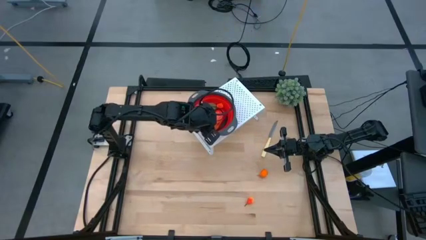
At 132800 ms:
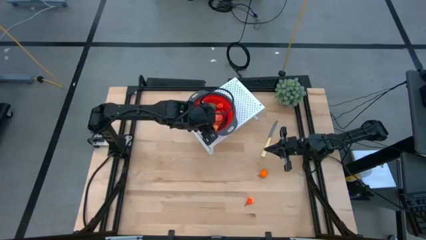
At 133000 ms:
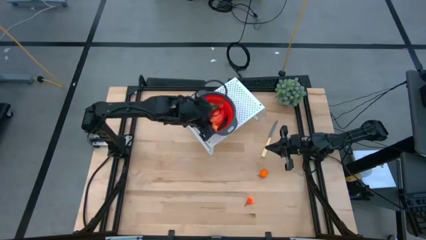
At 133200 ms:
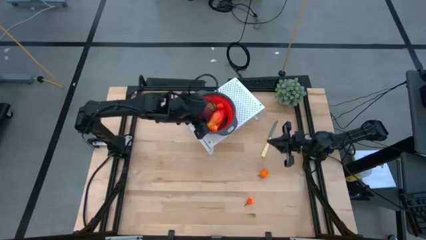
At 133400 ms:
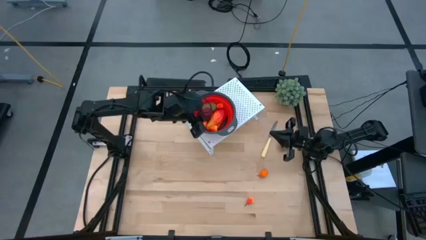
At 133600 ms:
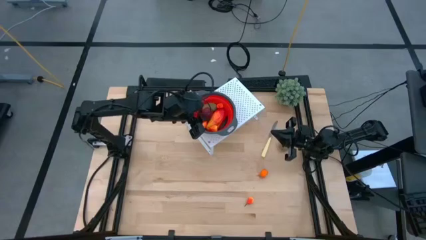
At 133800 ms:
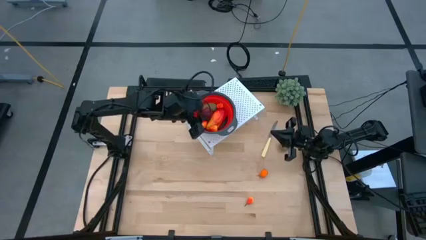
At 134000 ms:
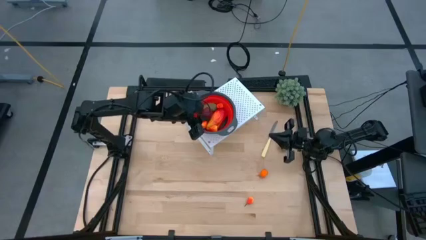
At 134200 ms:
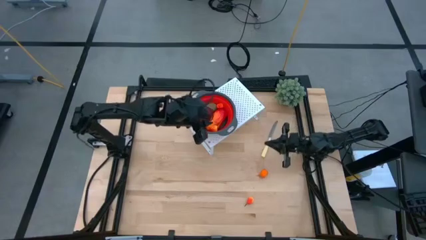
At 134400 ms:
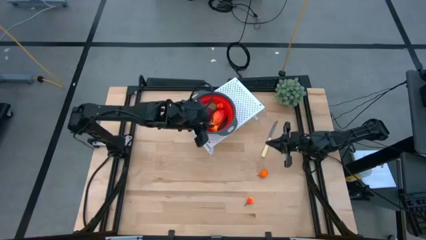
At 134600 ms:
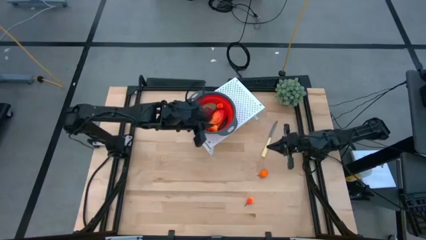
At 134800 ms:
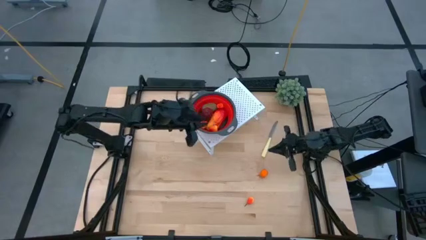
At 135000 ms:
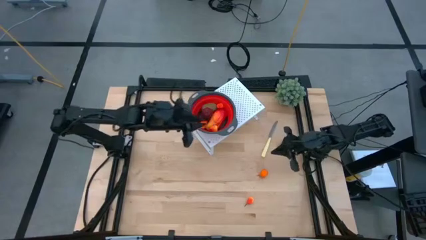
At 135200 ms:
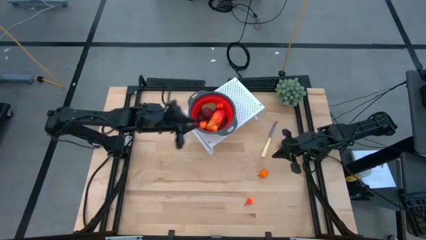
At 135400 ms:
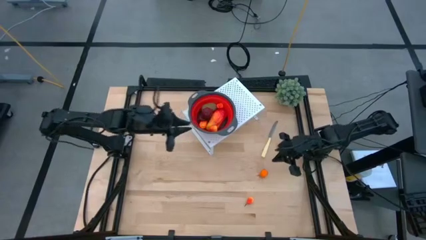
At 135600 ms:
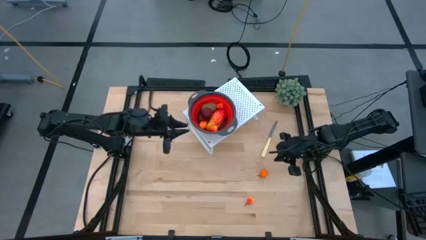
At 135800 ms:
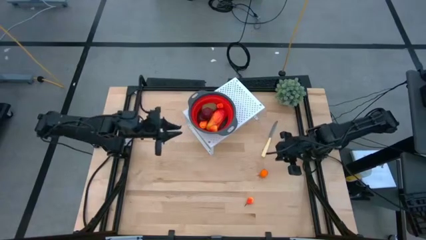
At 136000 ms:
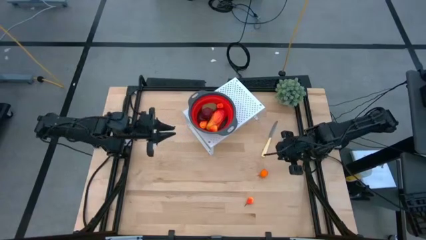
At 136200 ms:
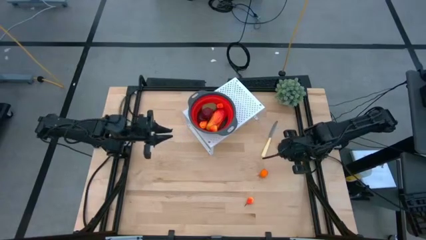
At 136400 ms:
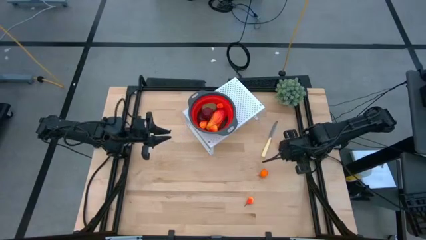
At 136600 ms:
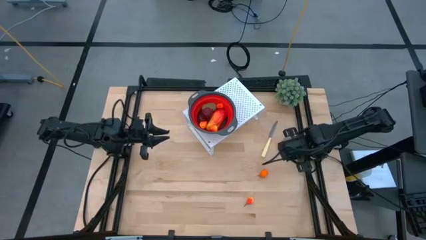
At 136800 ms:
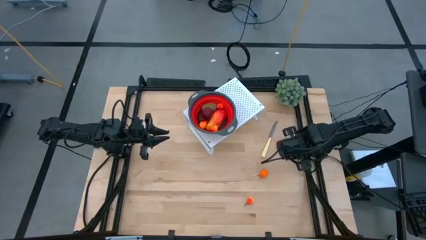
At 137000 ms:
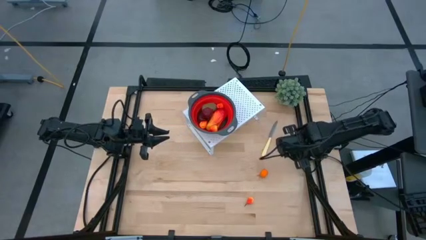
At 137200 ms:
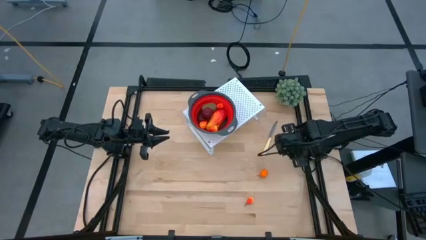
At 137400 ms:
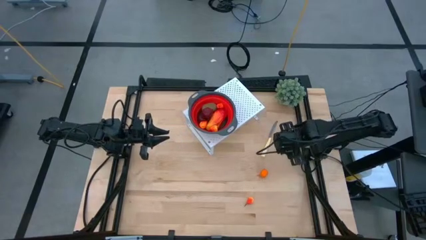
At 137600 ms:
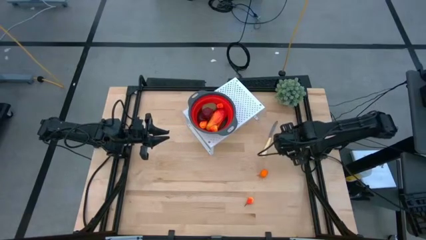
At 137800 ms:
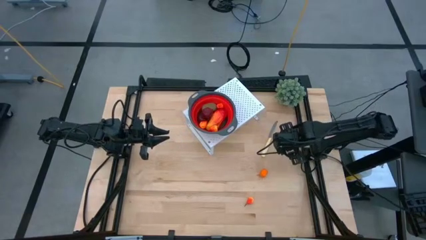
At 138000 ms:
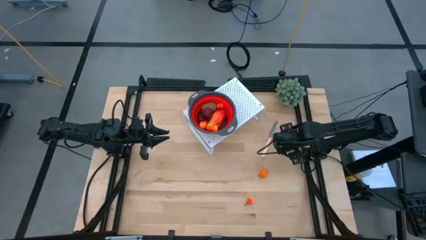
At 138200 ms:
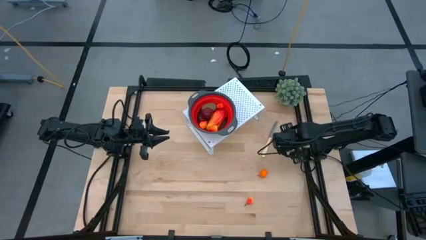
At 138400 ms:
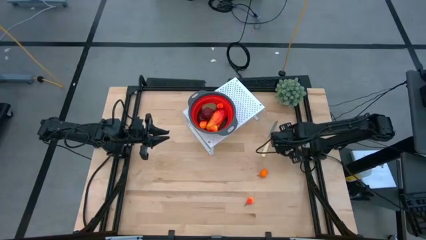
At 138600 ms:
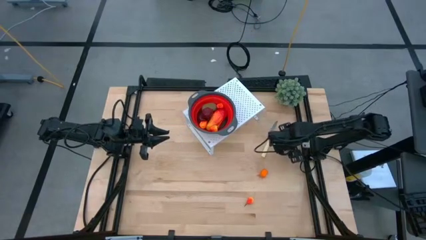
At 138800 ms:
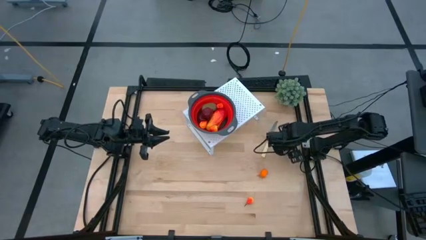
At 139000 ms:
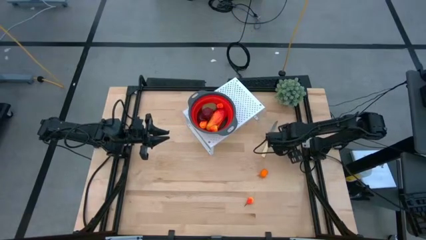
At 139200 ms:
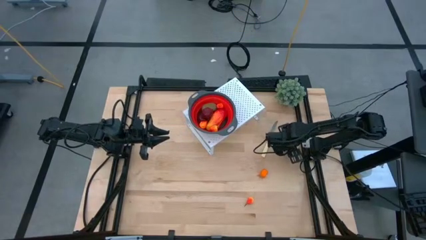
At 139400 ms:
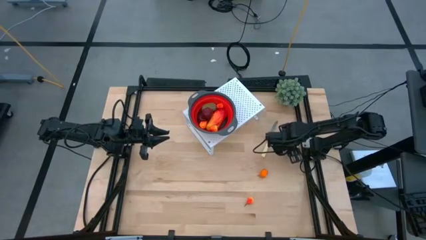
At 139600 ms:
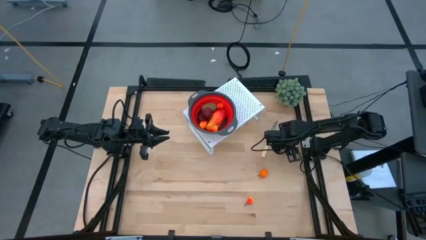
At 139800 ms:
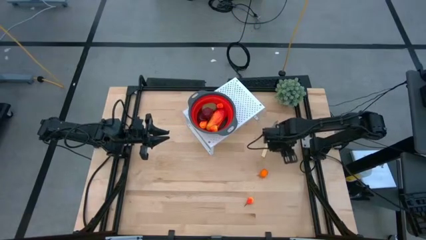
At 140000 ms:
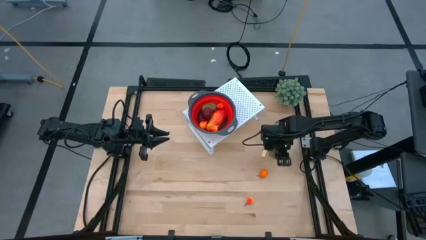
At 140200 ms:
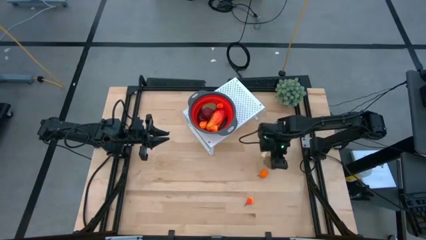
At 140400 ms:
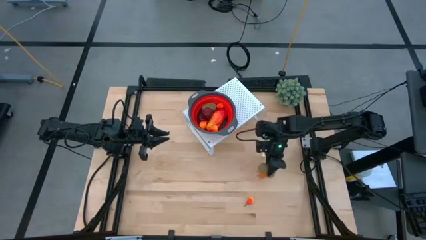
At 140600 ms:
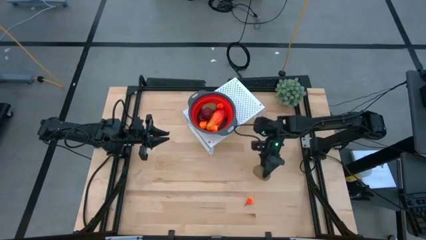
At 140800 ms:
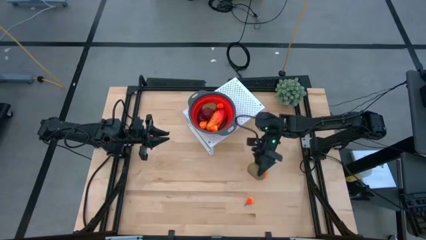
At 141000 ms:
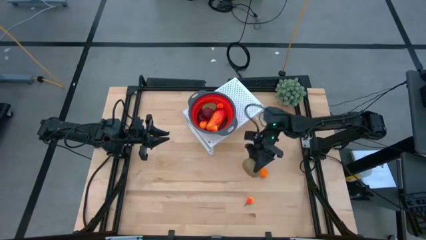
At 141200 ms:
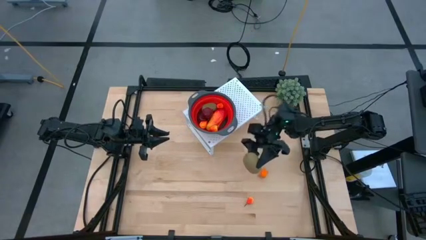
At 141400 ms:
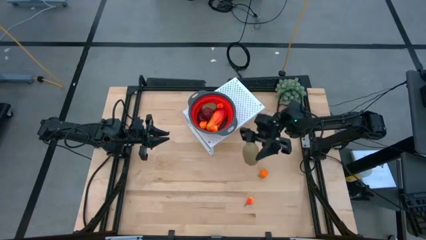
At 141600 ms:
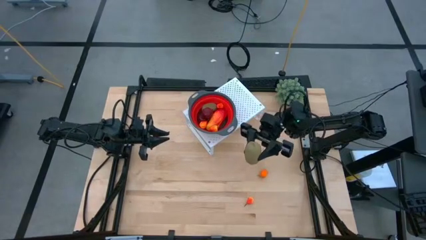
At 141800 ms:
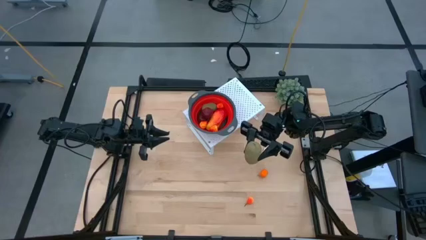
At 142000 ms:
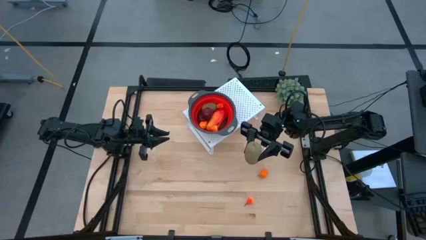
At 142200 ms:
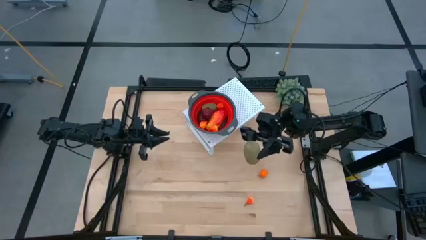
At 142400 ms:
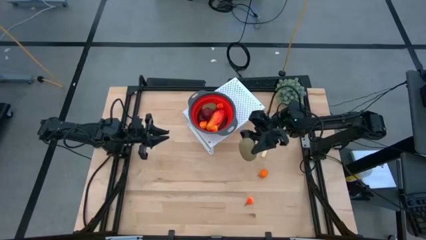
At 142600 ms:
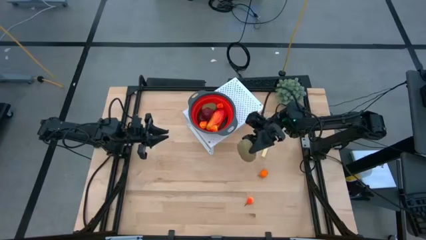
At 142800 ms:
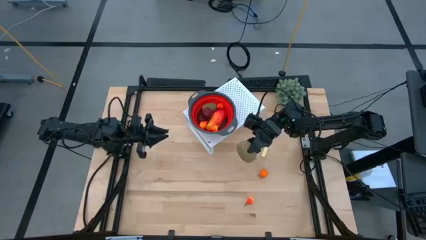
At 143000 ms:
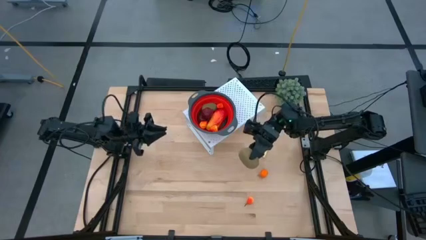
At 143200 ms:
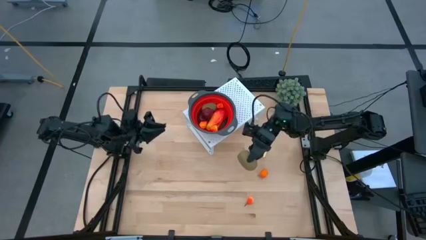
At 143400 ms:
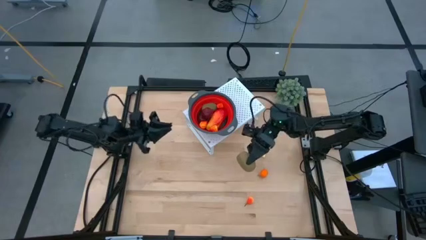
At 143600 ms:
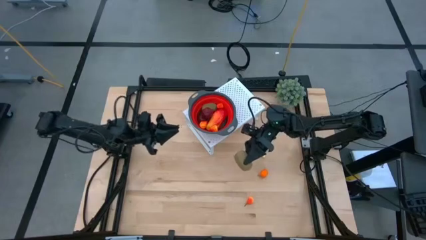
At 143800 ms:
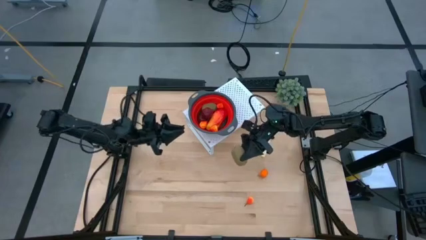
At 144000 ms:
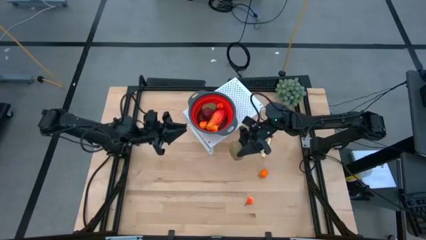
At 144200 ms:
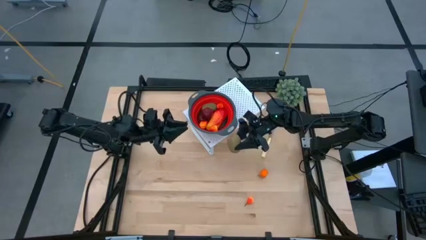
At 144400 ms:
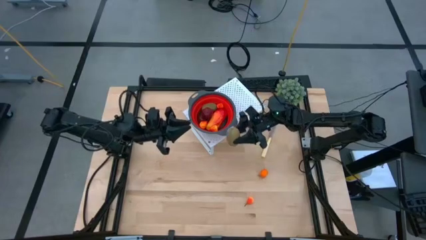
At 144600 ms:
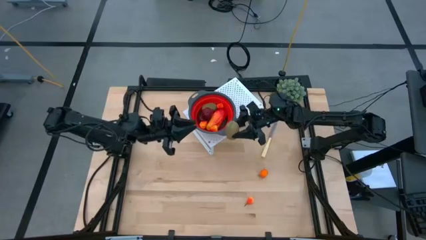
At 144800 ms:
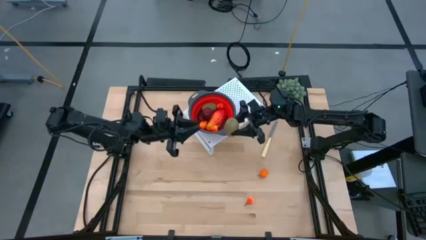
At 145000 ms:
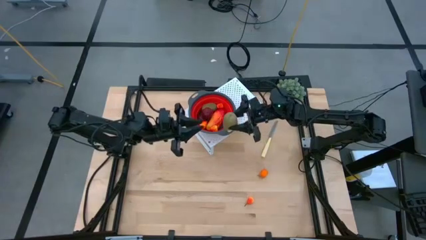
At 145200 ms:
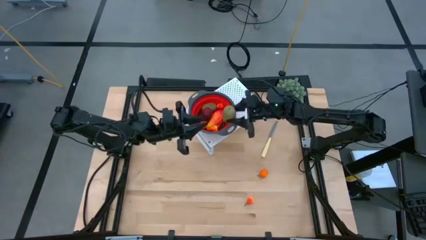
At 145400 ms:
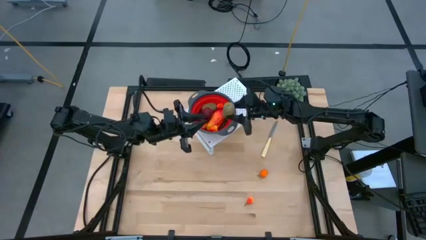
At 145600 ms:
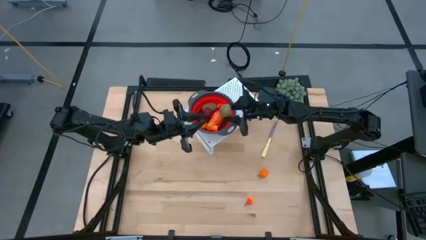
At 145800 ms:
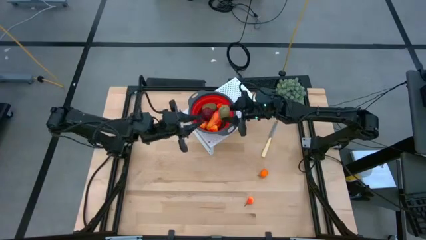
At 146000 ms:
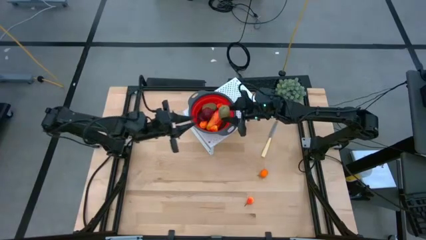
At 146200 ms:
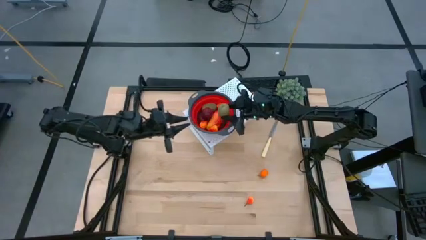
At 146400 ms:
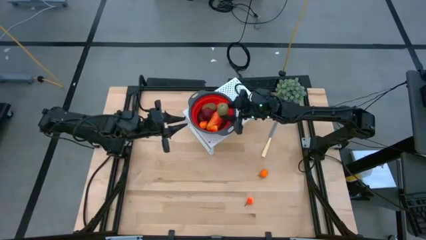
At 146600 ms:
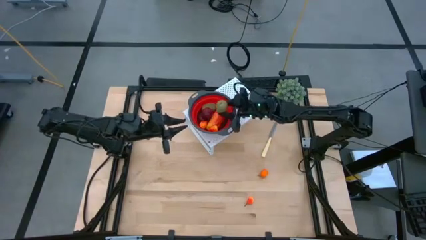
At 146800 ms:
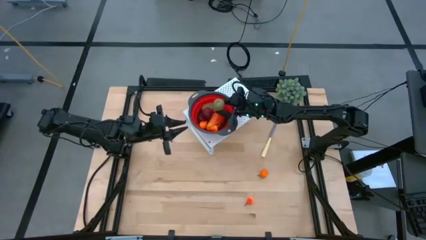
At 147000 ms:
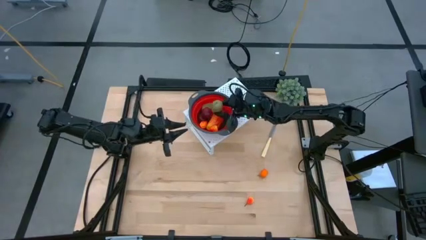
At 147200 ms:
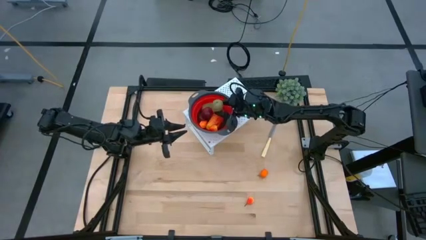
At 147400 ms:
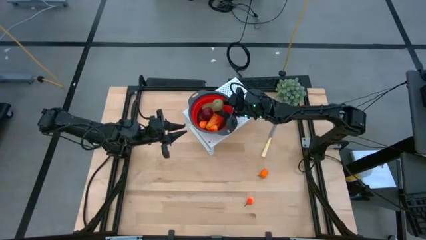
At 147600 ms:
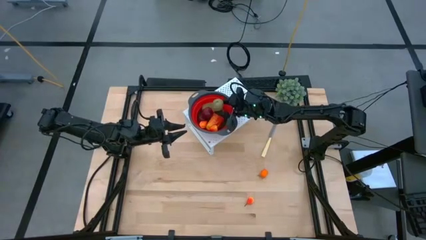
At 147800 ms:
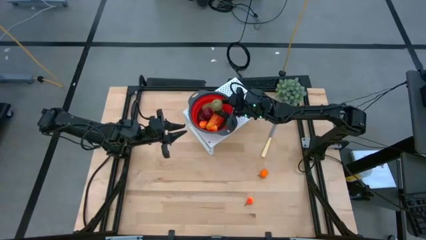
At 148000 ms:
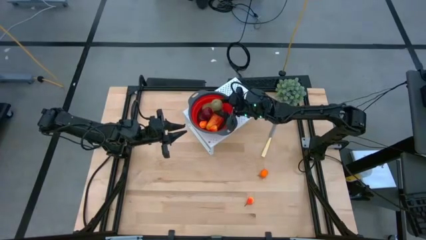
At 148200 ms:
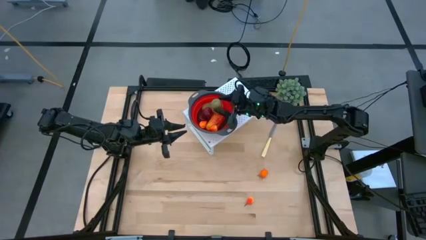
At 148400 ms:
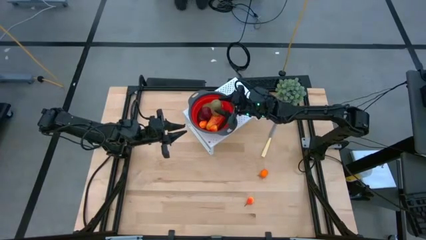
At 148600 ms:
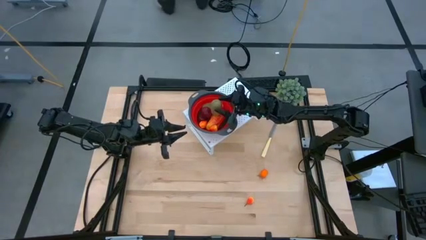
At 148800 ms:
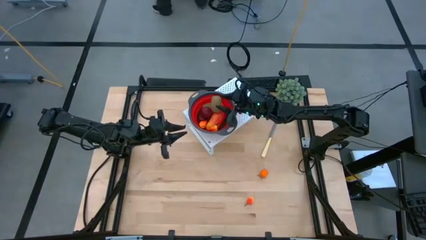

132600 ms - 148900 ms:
Task: Pick & Place Fruit
Put the kiwi into the red strainer
